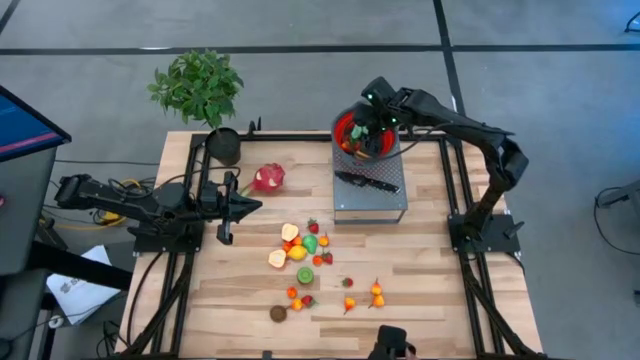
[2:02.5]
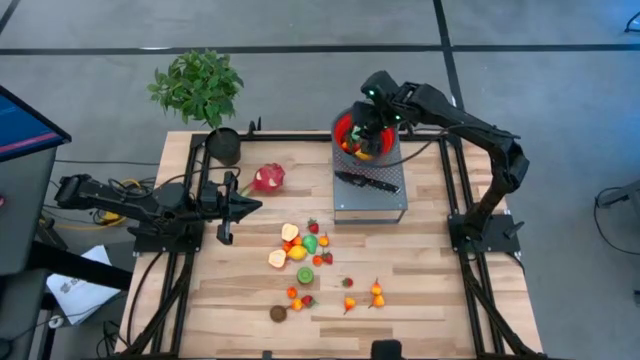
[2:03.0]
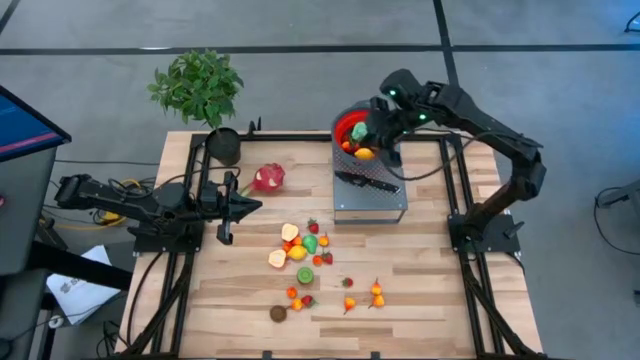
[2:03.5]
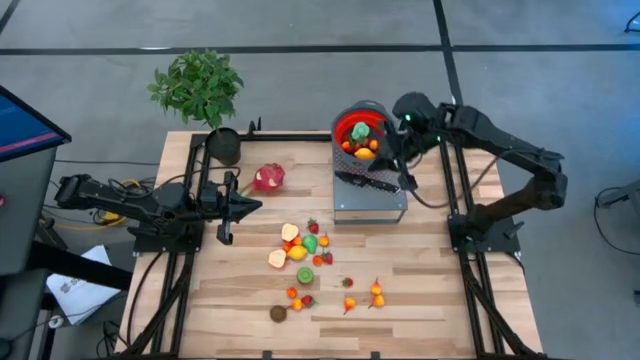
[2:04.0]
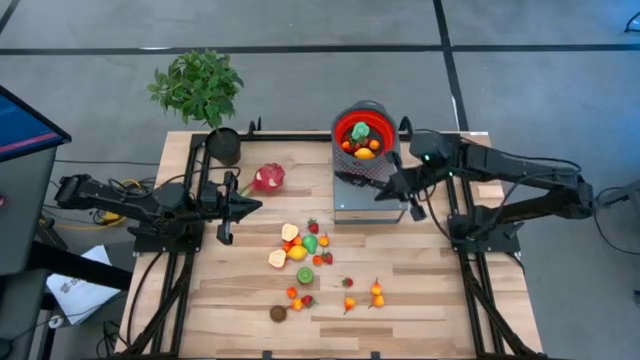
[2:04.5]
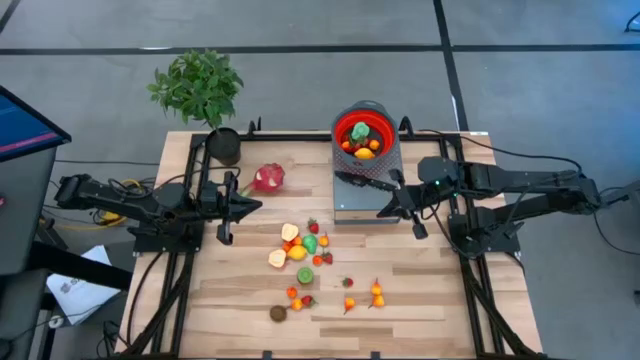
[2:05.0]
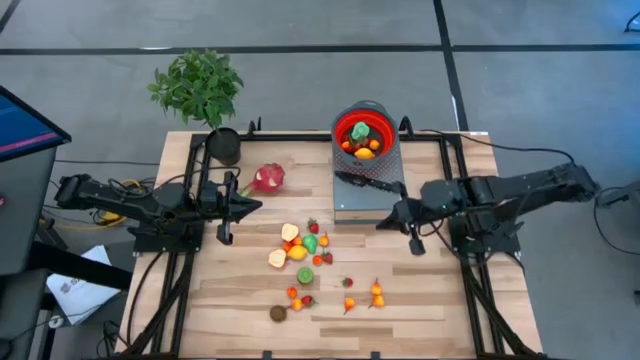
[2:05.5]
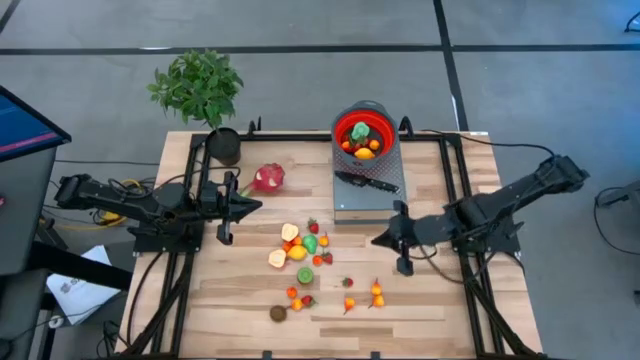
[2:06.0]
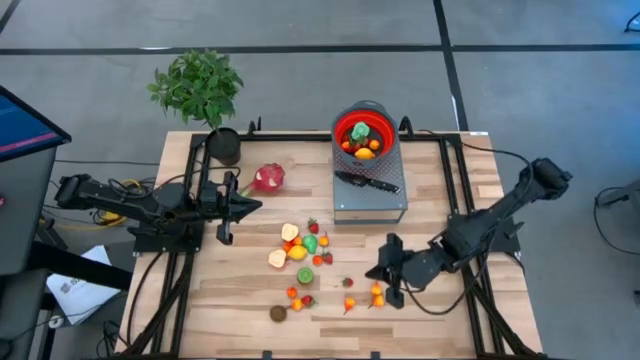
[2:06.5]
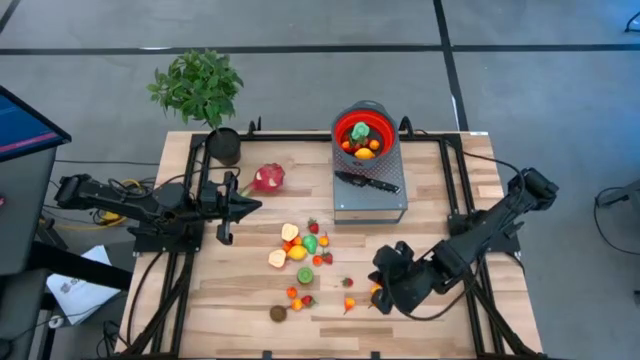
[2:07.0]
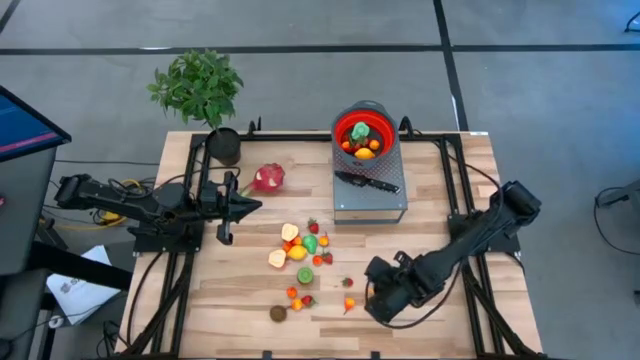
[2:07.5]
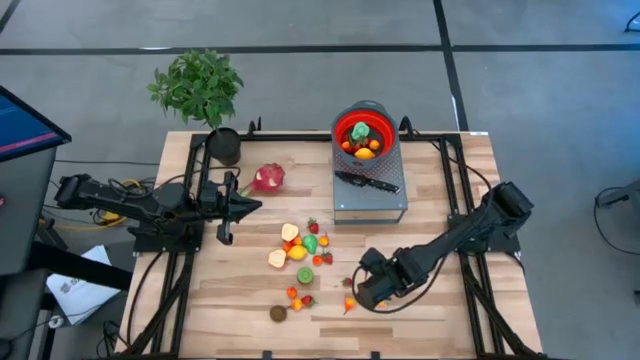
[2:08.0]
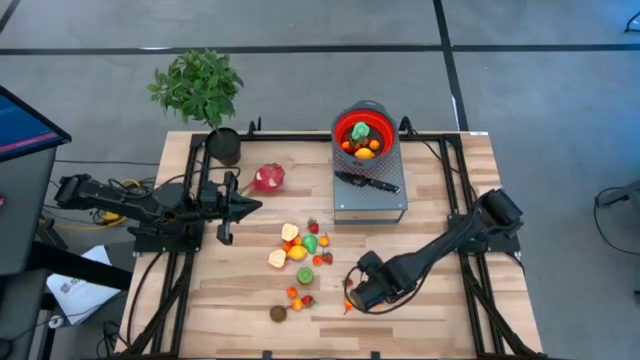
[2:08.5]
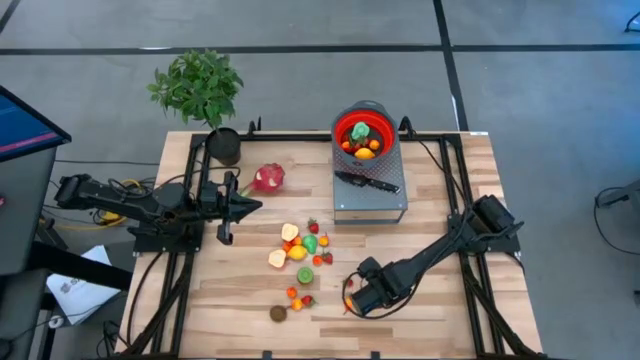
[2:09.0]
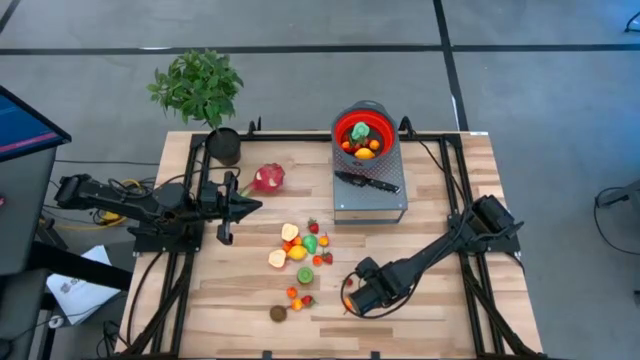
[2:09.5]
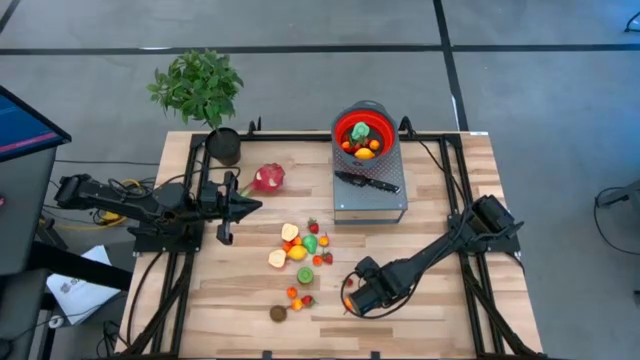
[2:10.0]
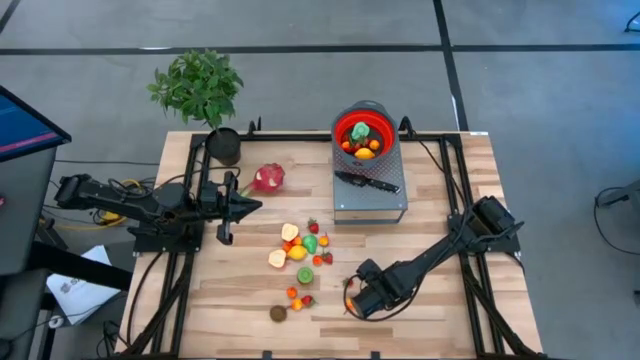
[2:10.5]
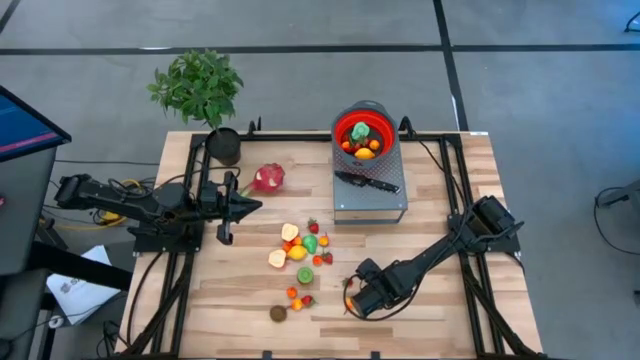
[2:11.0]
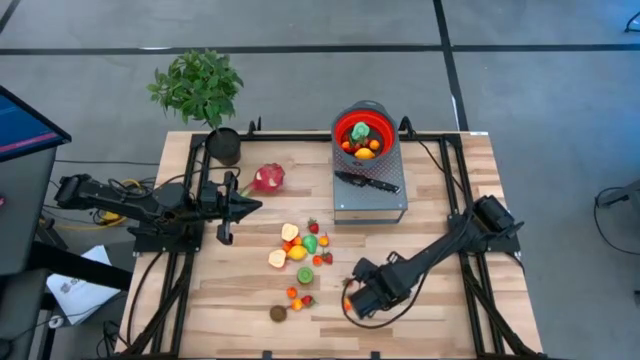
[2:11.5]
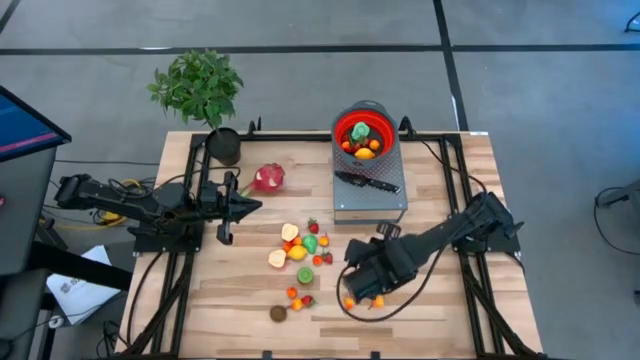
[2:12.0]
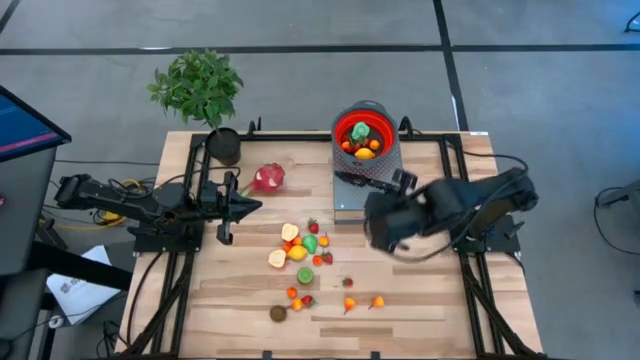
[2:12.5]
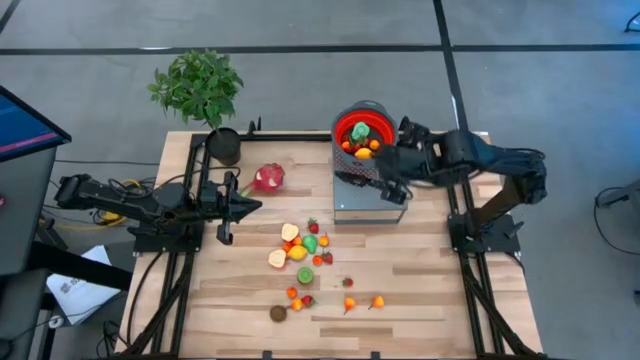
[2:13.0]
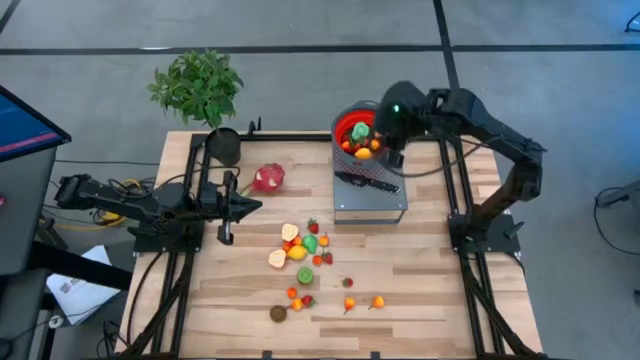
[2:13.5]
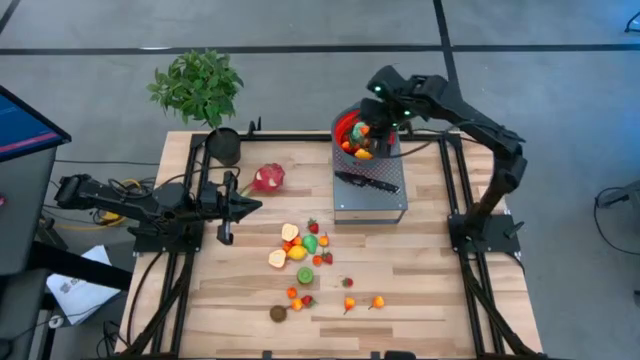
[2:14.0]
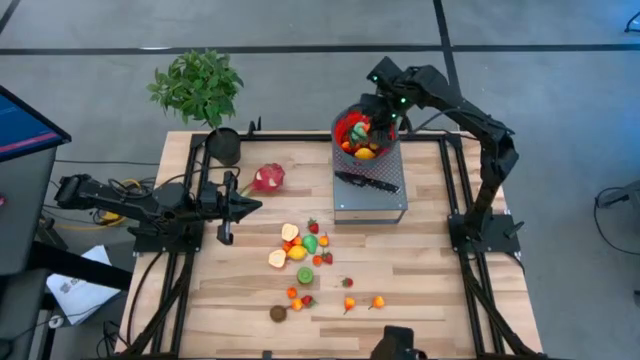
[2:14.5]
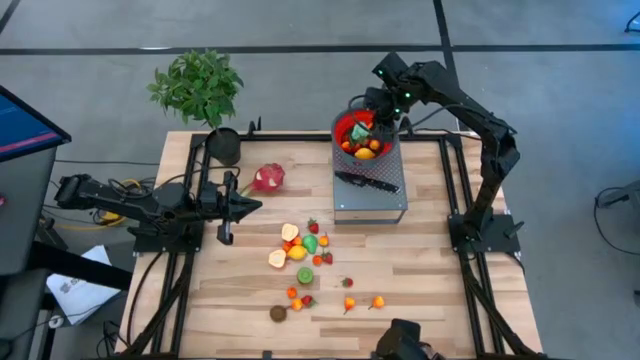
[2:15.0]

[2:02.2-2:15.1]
Task: Pick & Place Fruit
Put the yellow pear into the red colander on the shelf

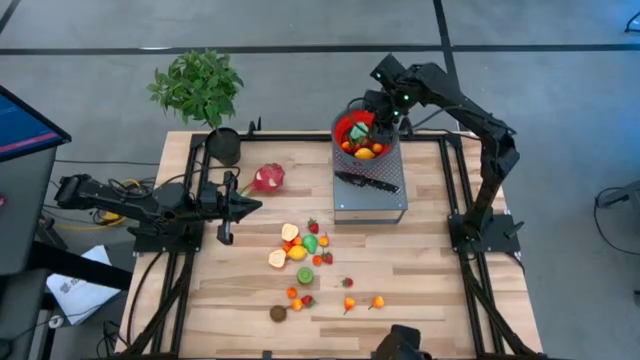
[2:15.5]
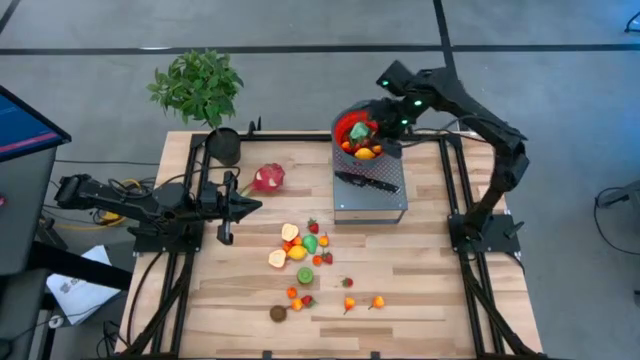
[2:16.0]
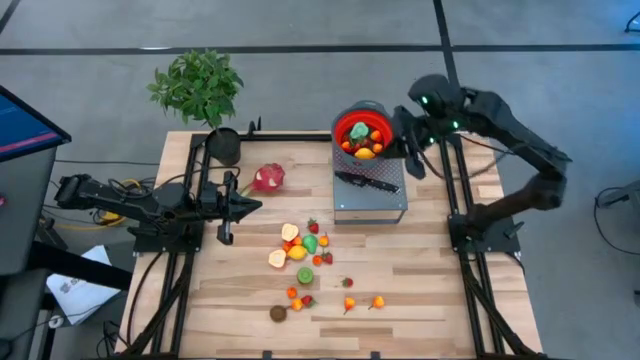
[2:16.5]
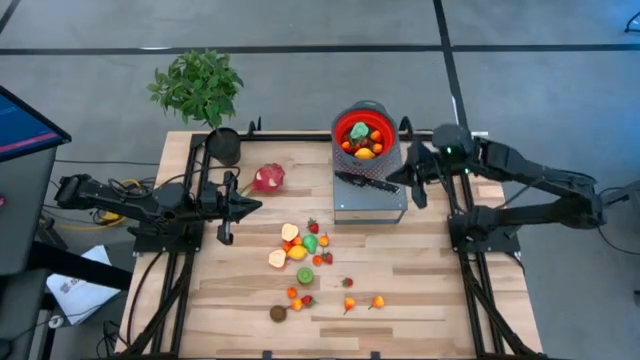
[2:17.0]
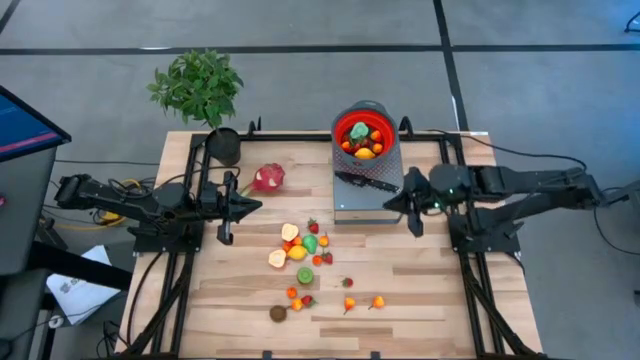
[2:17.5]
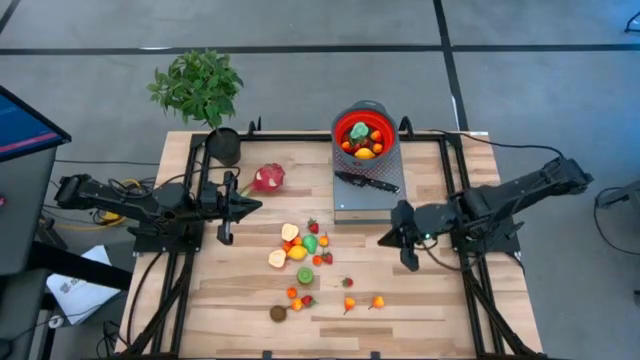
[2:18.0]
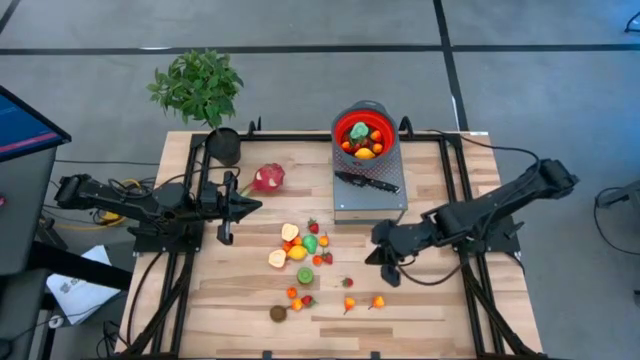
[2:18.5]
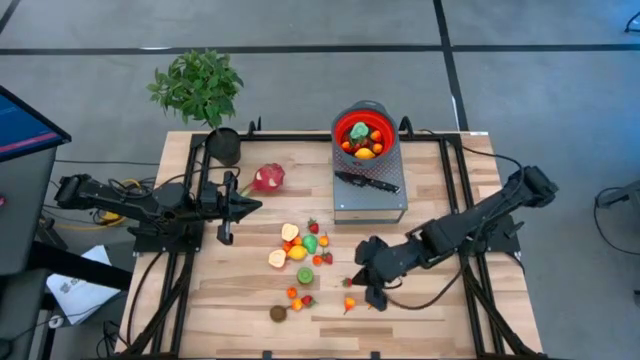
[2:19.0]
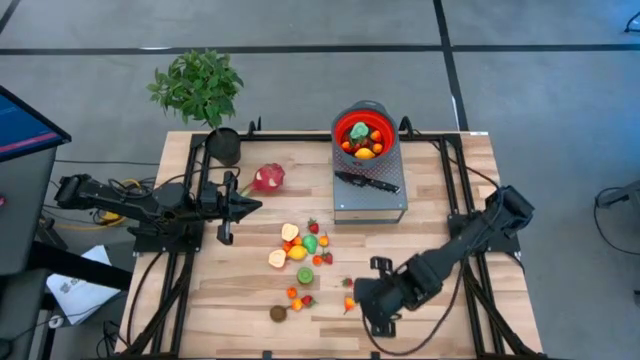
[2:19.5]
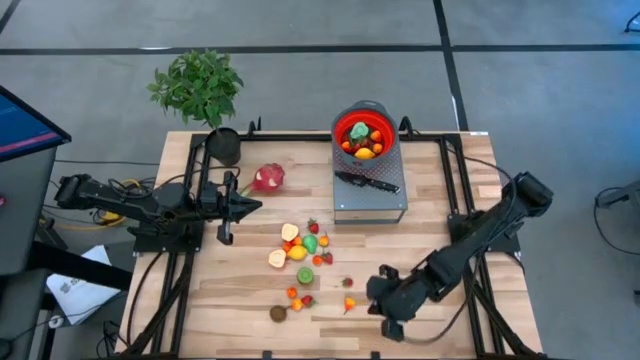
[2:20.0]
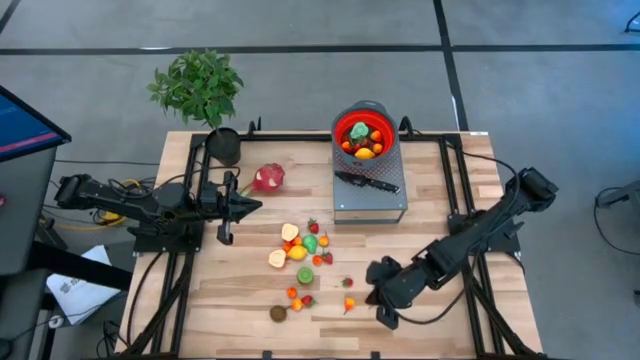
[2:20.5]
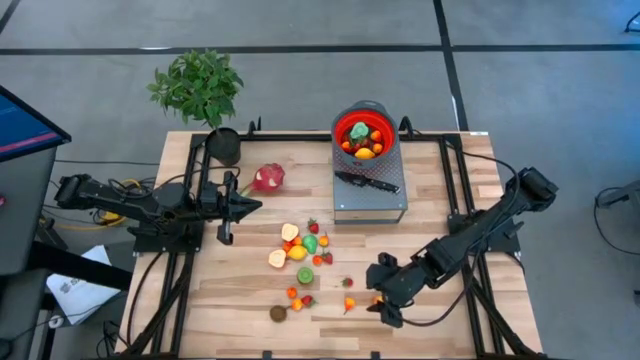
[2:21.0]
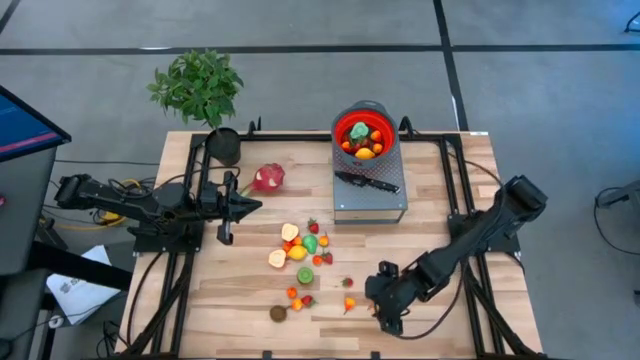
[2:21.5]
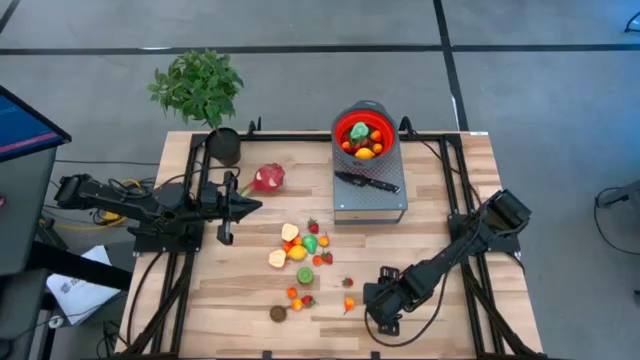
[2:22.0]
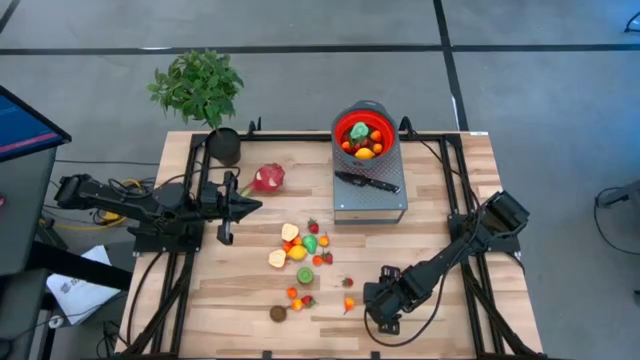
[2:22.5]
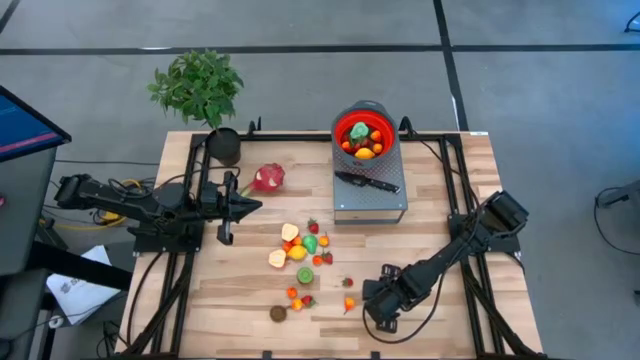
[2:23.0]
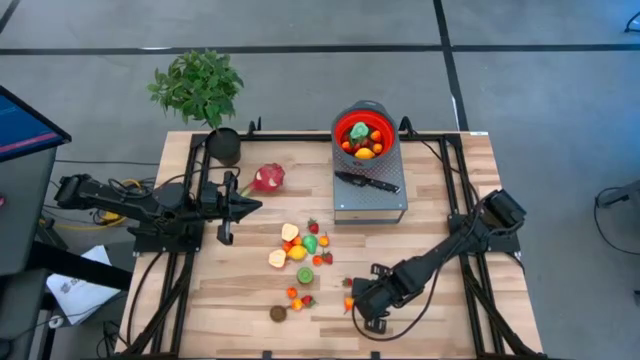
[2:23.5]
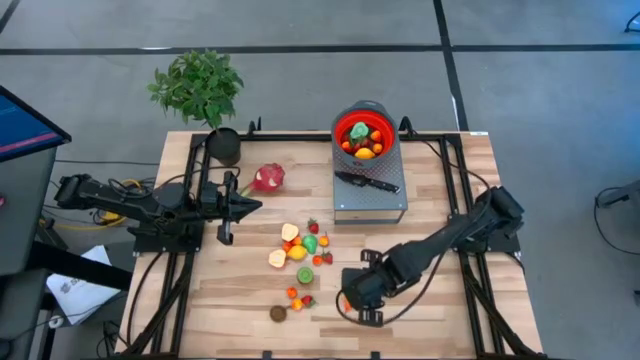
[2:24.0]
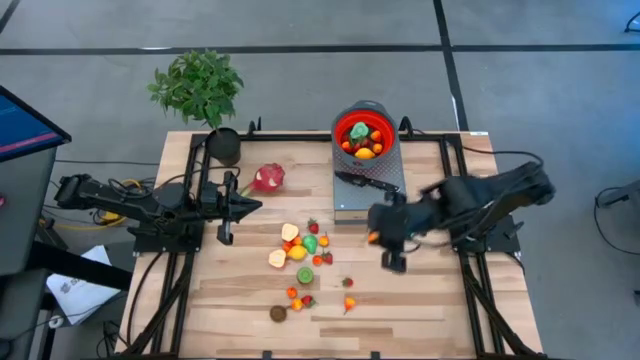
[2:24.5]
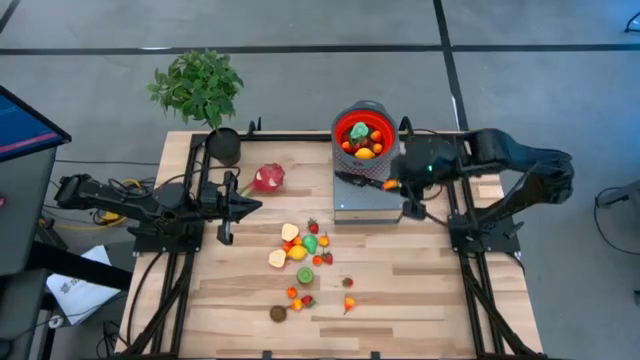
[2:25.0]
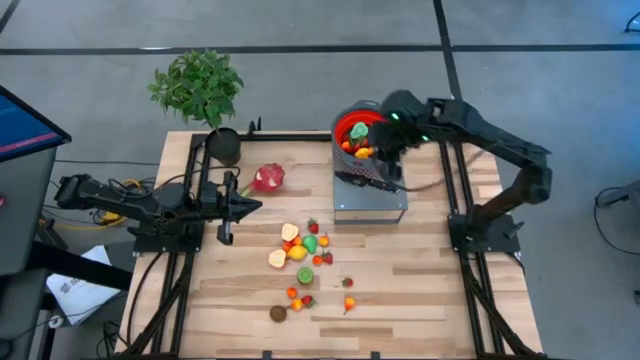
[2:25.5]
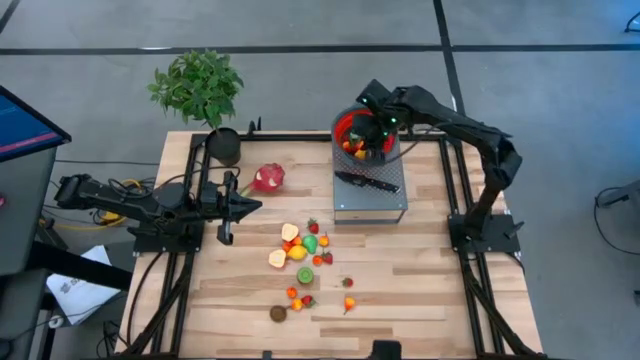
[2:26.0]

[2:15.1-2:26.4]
Put the yellow pear into the red colander on the shelf
